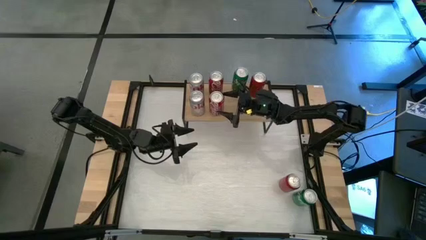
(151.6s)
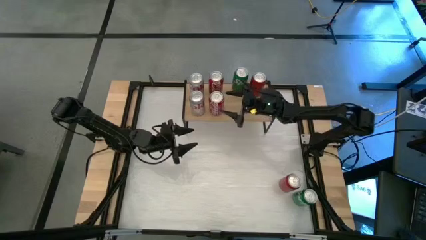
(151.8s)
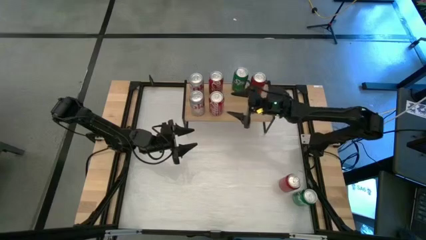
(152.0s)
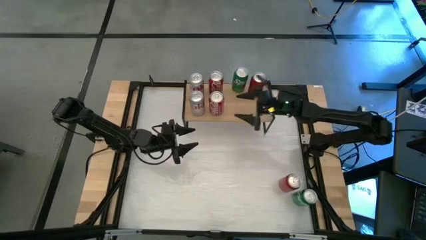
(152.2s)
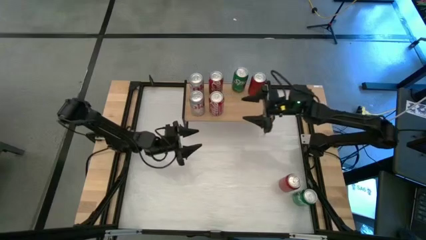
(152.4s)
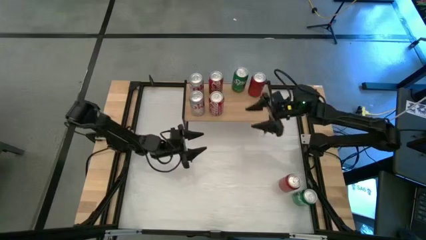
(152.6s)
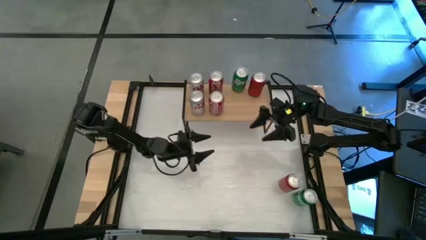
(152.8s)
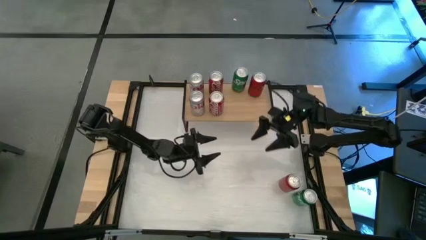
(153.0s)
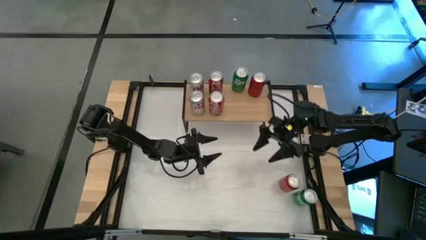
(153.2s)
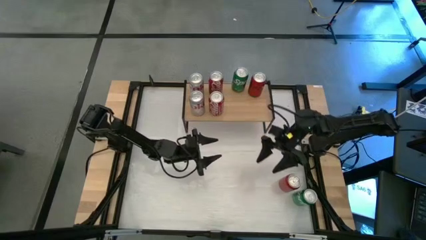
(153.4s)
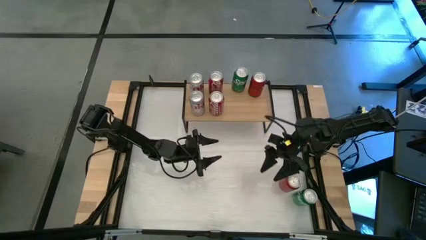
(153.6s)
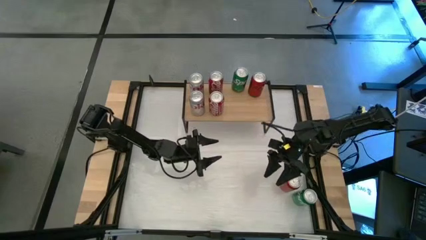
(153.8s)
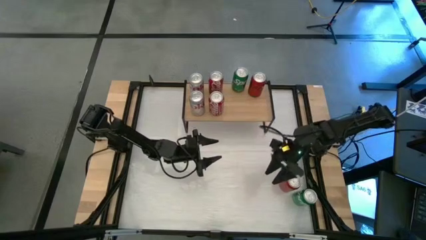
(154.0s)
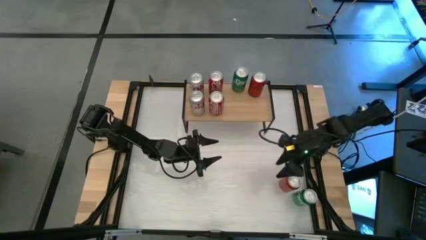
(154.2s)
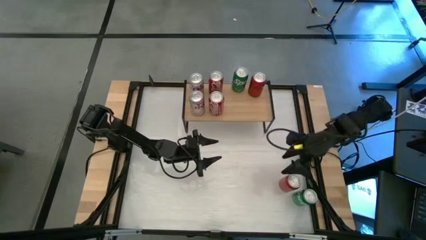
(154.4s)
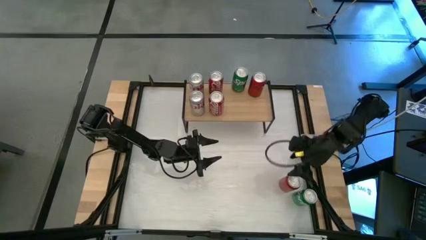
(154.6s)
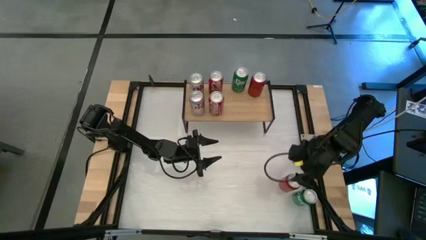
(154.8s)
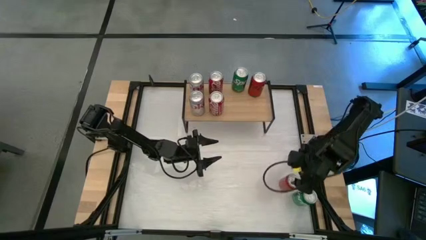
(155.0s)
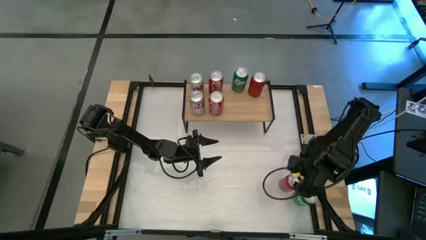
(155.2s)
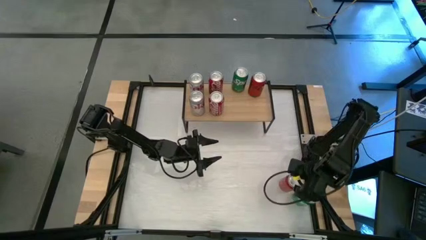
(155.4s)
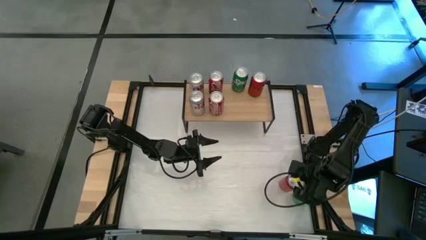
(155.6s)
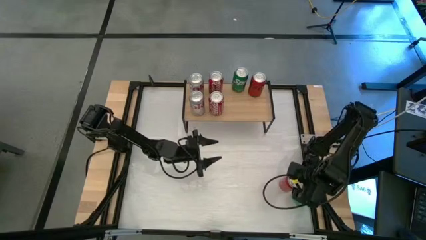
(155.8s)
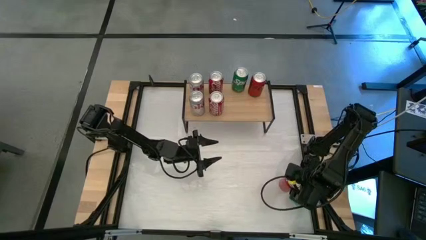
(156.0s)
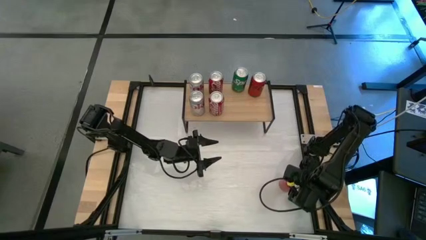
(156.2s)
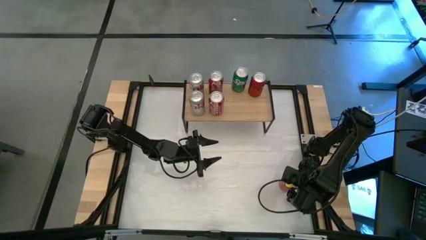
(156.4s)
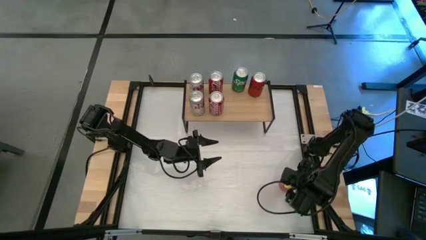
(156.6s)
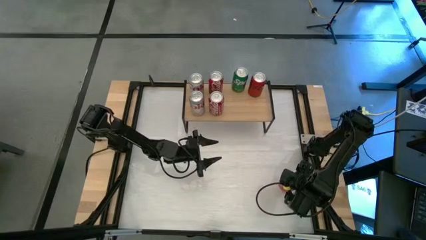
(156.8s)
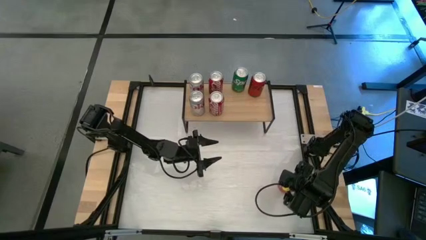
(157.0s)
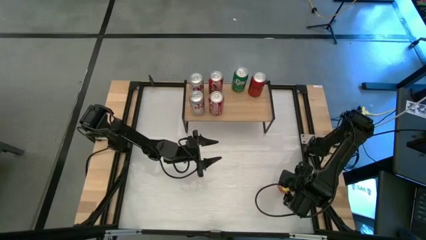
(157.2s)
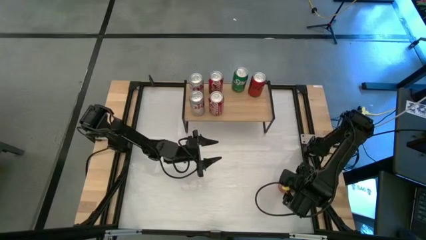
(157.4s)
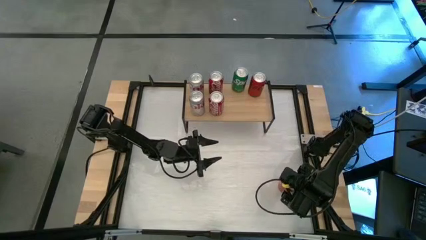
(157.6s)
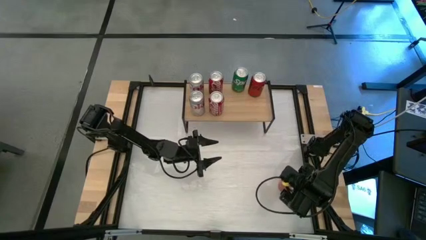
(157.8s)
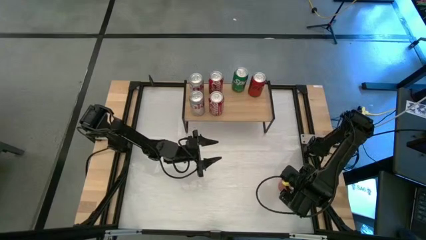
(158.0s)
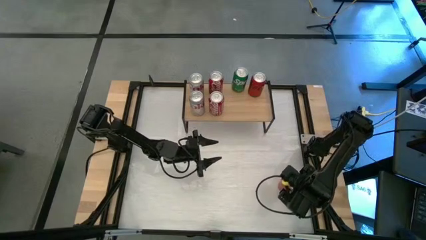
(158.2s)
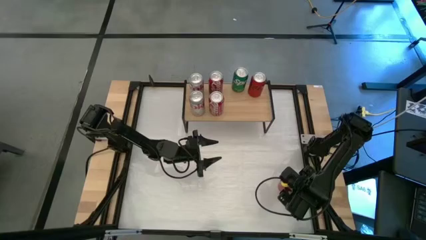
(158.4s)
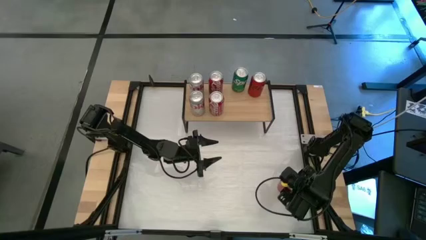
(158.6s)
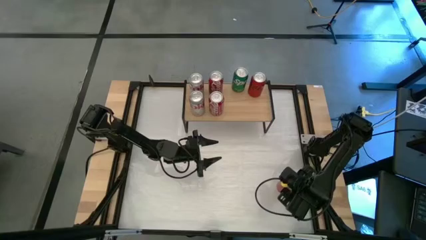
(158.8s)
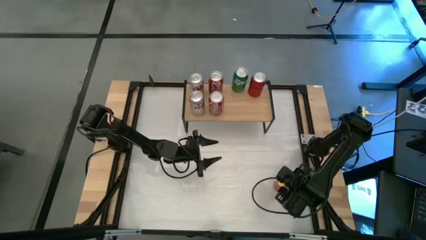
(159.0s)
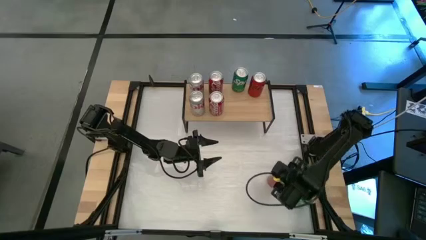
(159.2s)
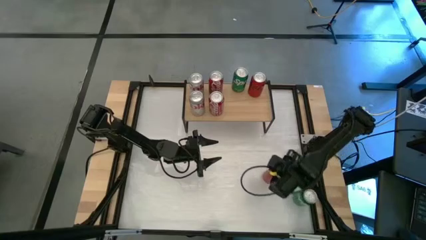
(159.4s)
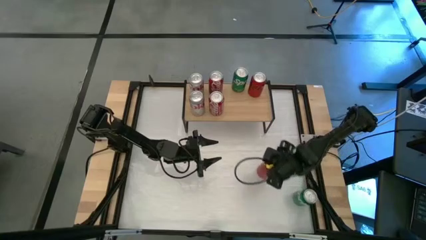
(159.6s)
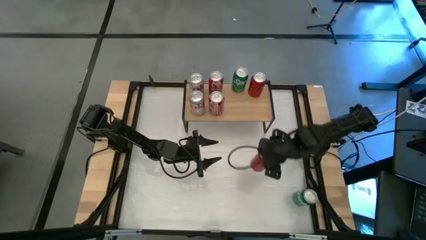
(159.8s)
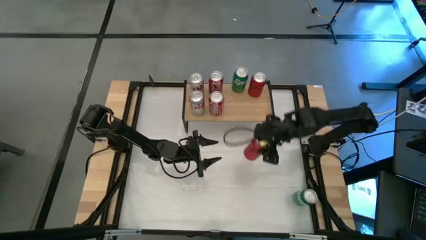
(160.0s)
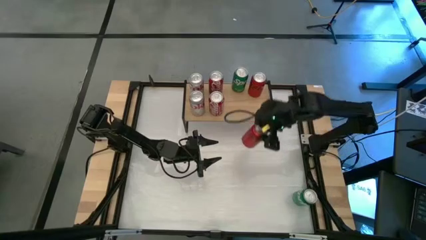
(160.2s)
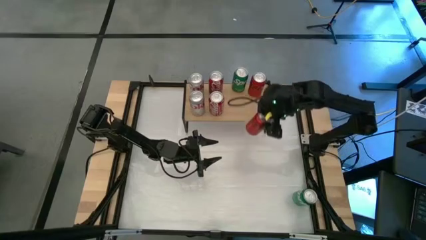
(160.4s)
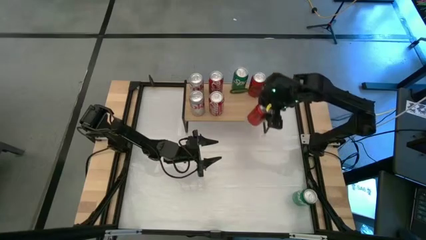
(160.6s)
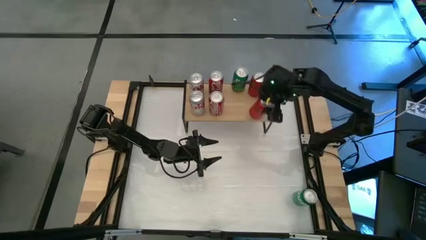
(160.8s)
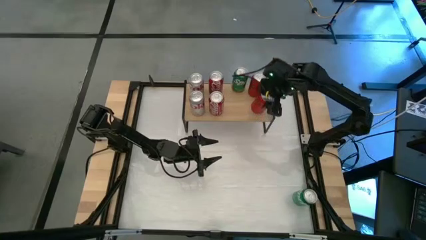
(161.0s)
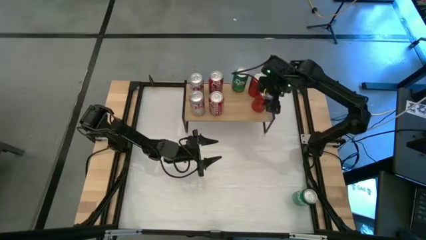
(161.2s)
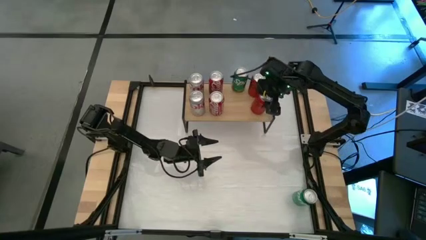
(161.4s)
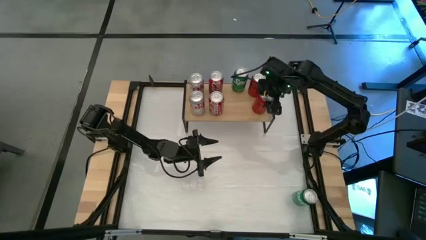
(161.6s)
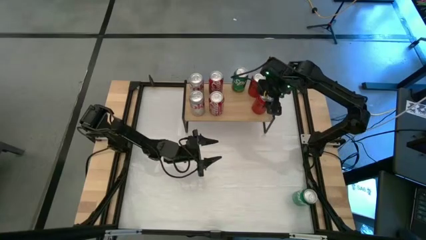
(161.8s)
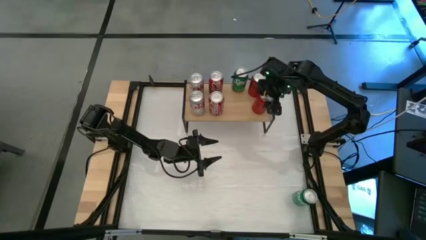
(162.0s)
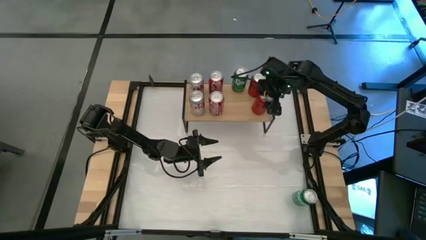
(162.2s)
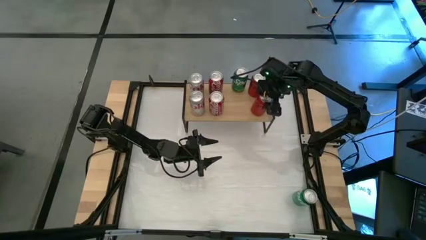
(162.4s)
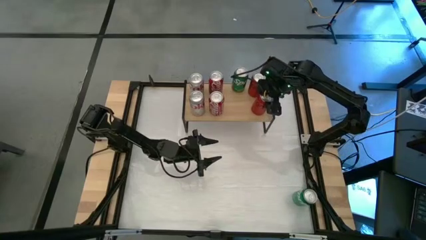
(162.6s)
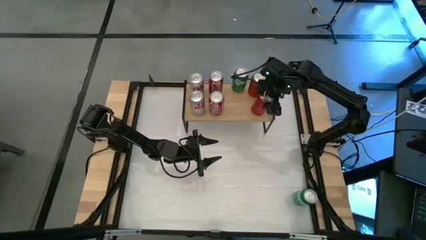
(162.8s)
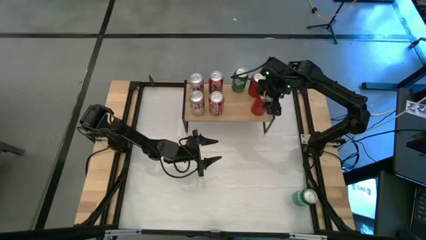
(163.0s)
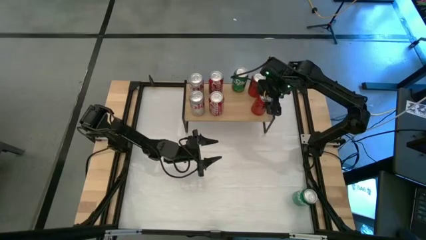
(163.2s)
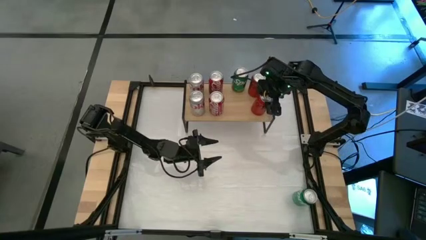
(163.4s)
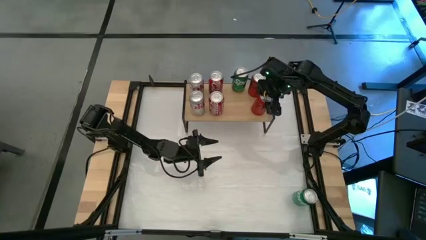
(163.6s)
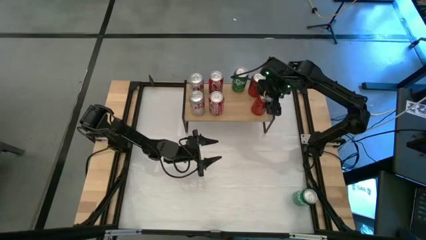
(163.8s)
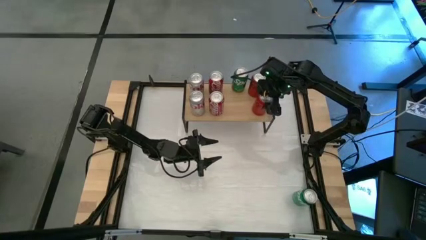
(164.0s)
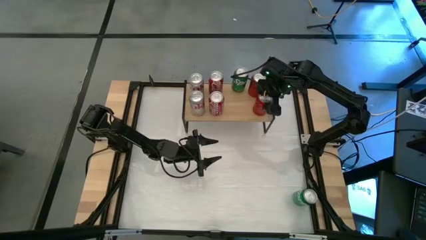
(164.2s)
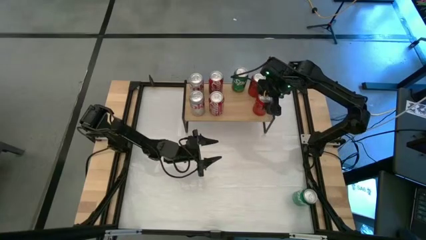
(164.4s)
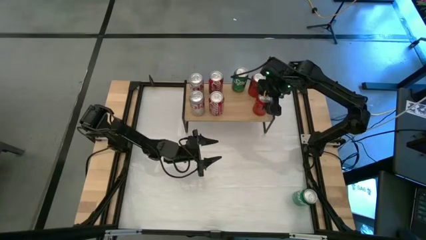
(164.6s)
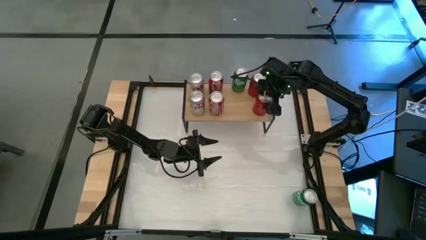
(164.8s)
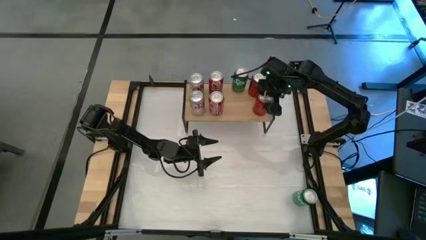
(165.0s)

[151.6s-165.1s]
Task: Place canned beverage on shelf
Put the red-black soda can aligned with the other red-black soda can on the shelf

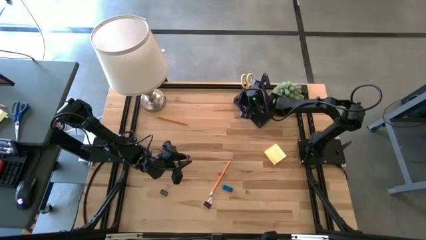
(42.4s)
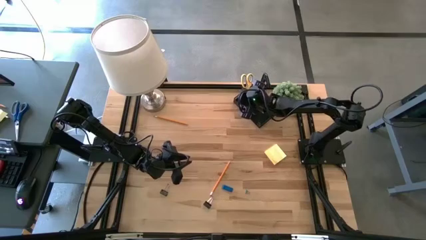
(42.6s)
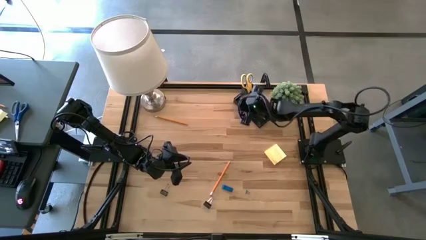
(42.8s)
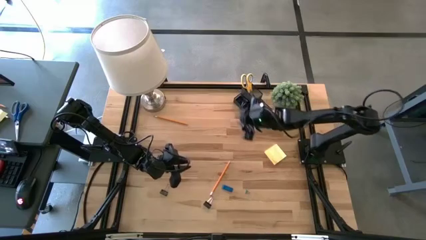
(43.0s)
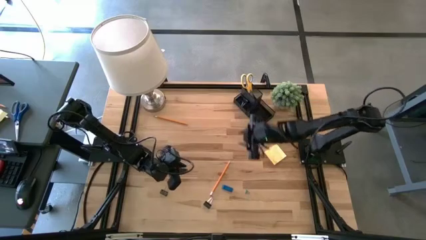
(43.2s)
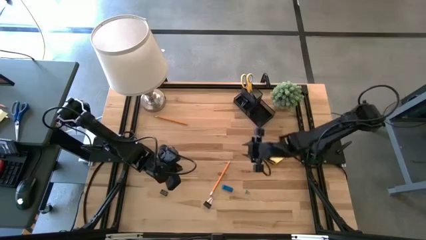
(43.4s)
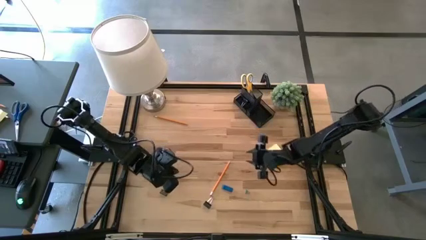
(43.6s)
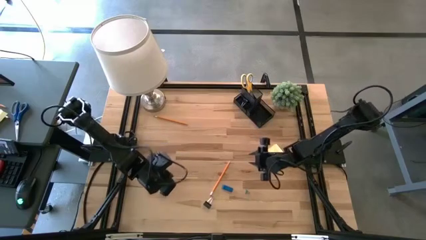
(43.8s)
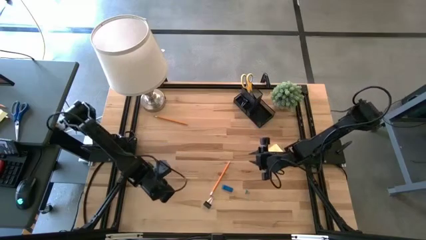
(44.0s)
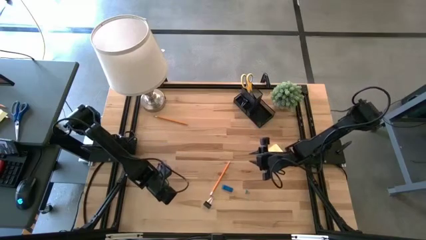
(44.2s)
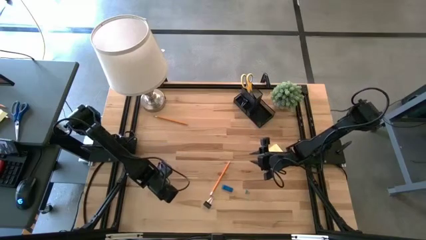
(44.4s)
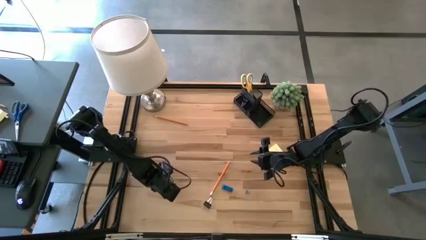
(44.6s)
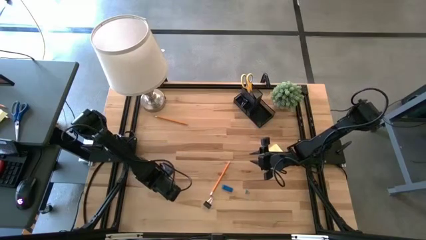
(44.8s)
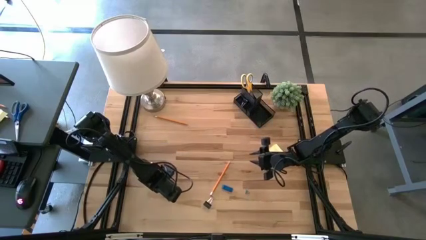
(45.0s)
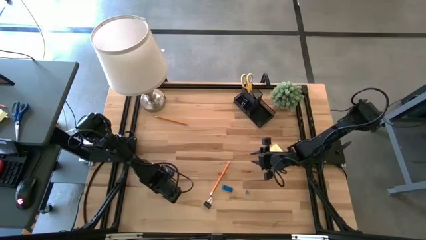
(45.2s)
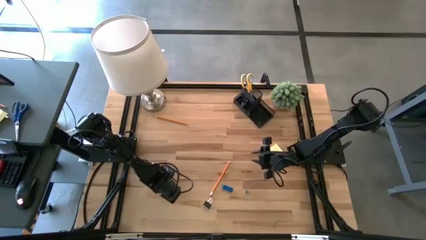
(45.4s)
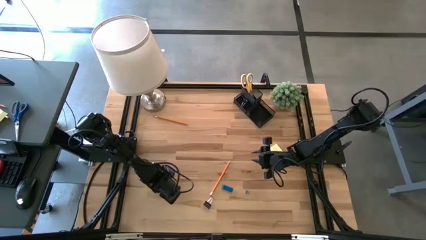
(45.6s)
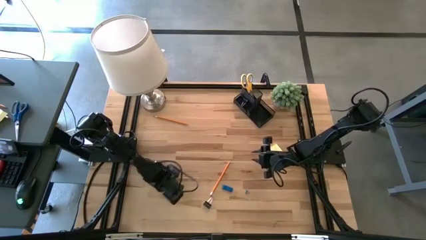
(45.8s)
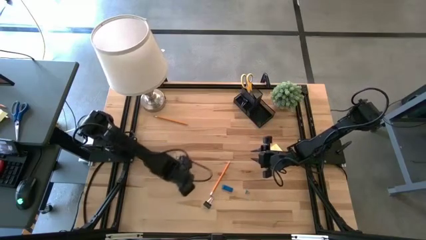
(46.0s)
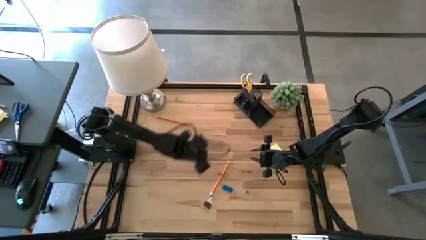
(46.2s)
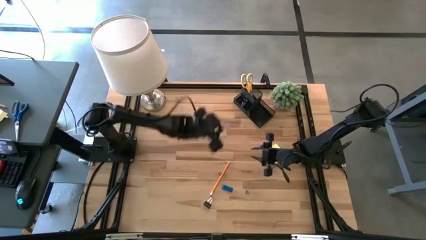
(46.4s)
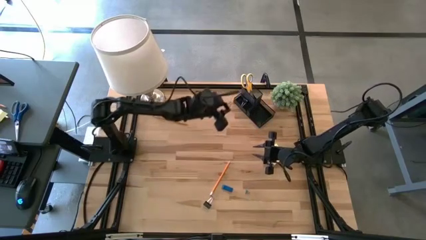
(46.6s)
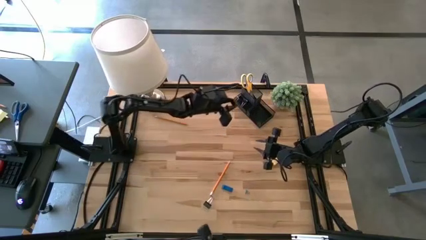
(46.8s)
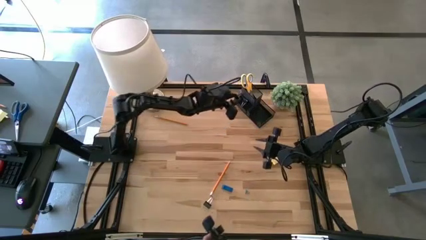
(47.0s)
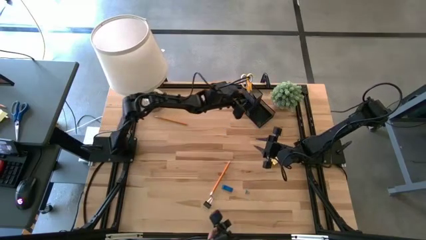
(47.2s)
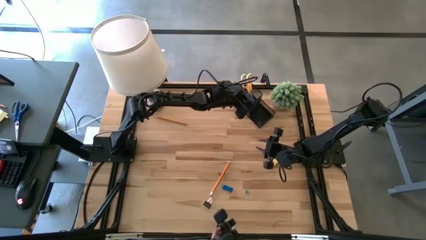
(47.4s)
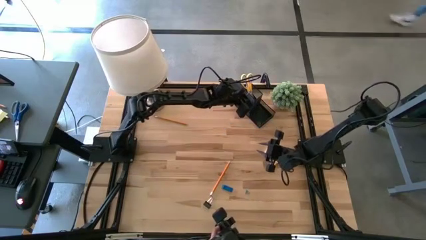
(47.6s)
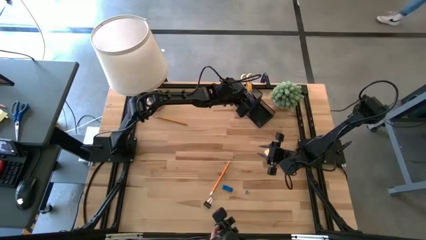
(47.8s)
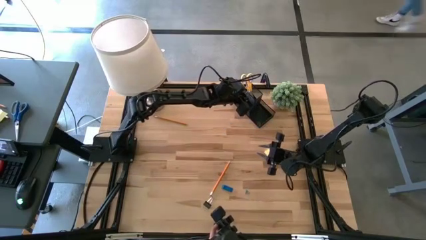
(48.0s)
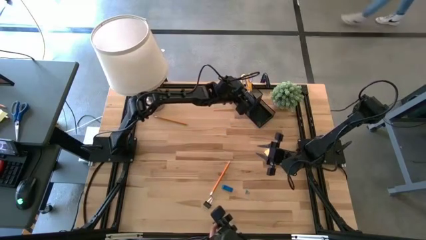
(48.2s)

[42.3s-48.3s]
Task: Pick and place office supplies into organizer
Put the right black binder clip into the desk organizer
